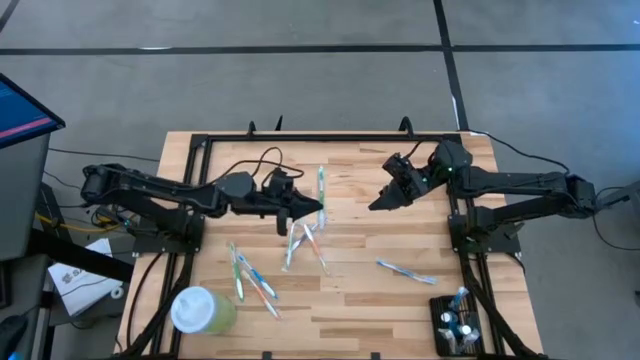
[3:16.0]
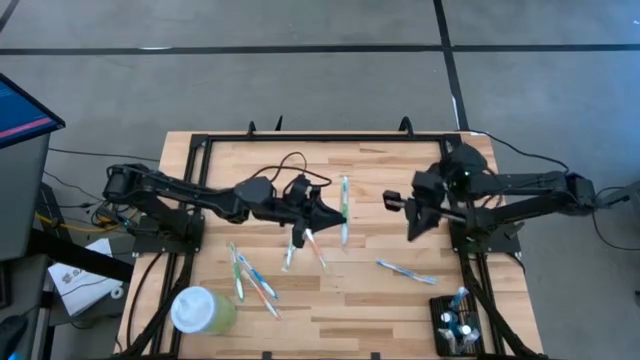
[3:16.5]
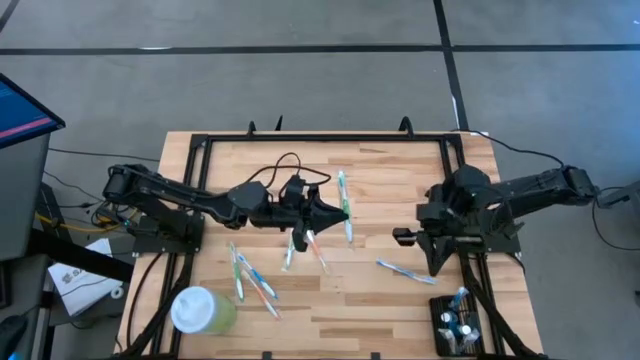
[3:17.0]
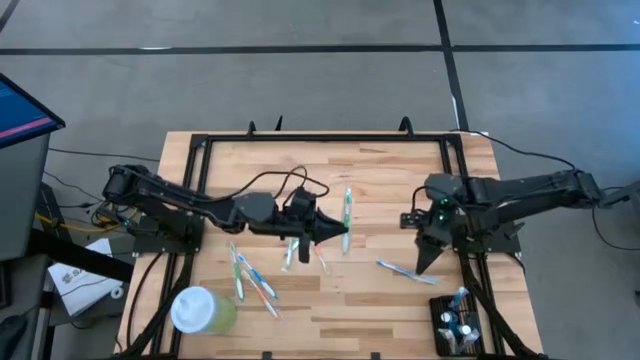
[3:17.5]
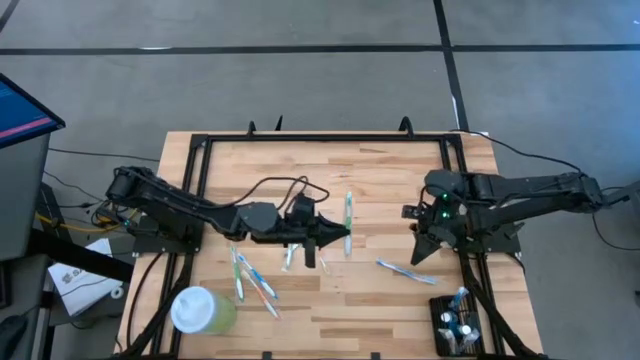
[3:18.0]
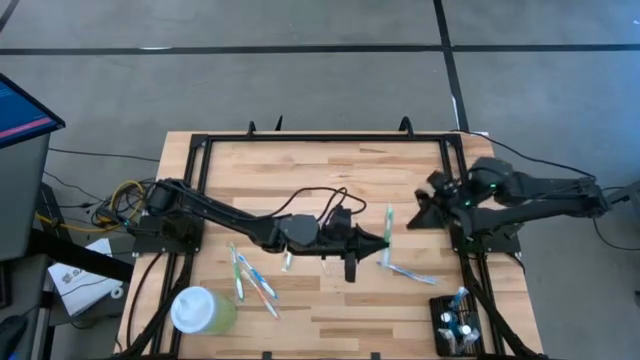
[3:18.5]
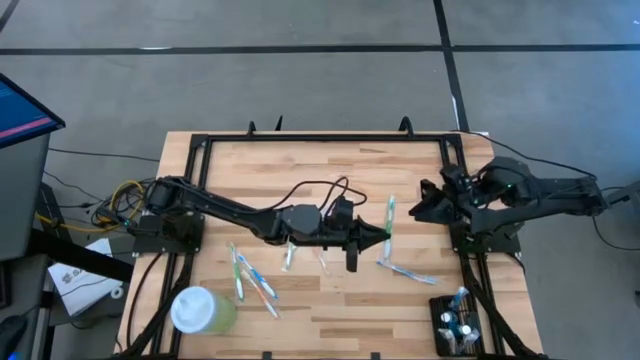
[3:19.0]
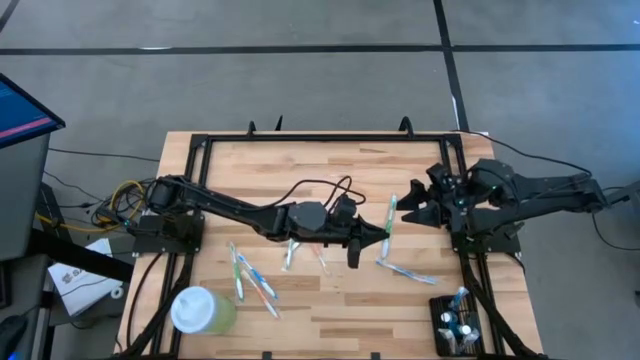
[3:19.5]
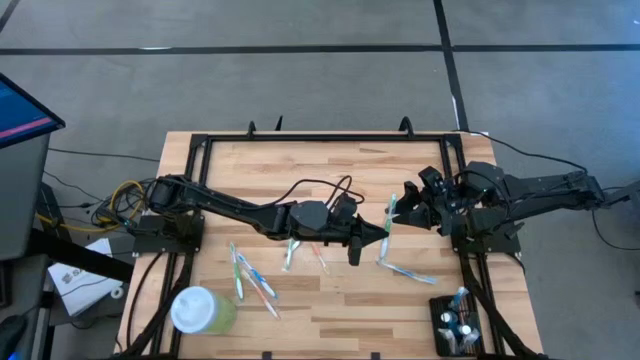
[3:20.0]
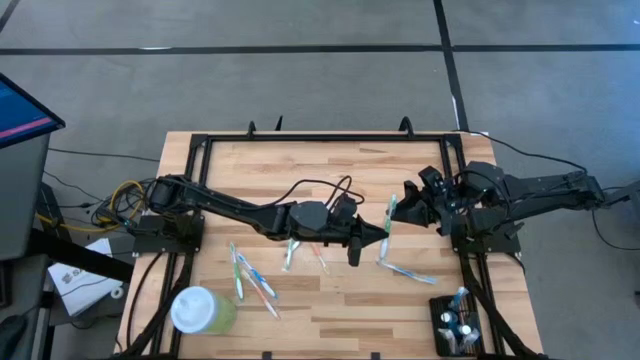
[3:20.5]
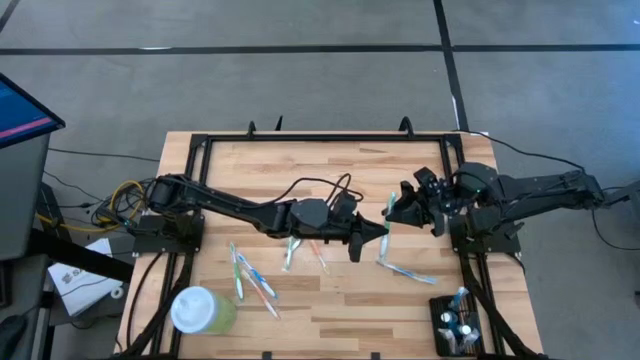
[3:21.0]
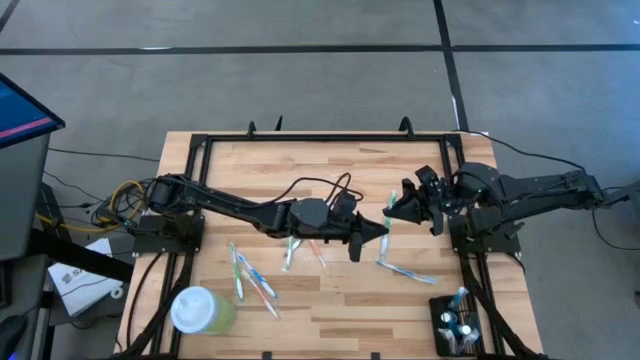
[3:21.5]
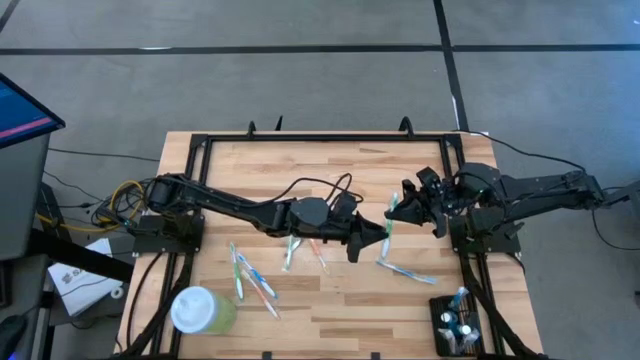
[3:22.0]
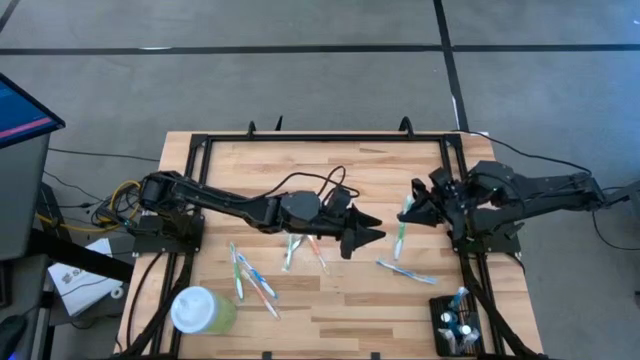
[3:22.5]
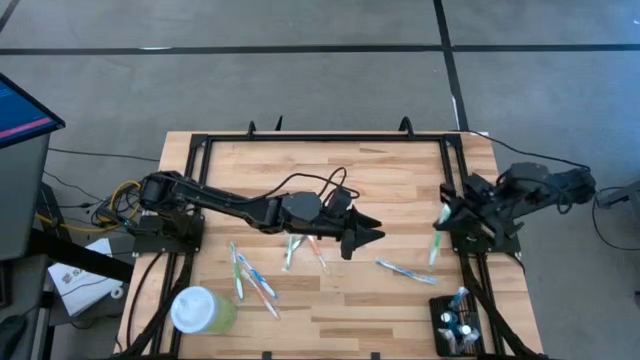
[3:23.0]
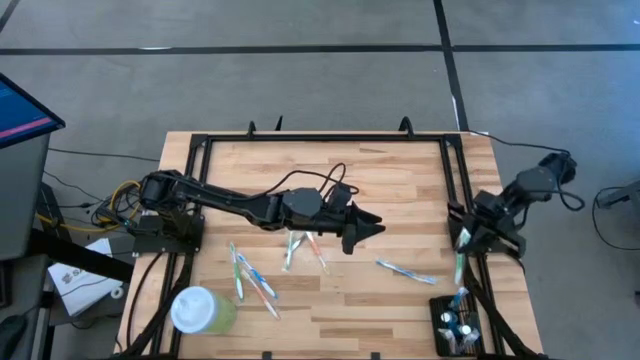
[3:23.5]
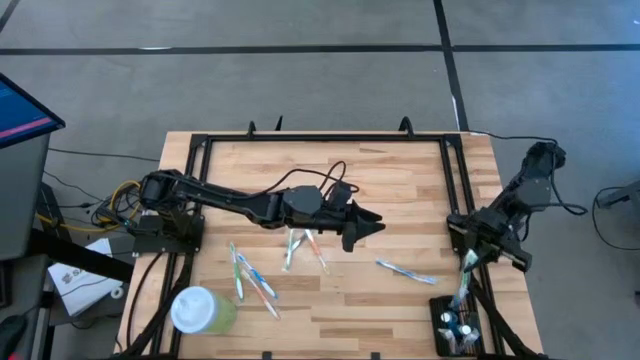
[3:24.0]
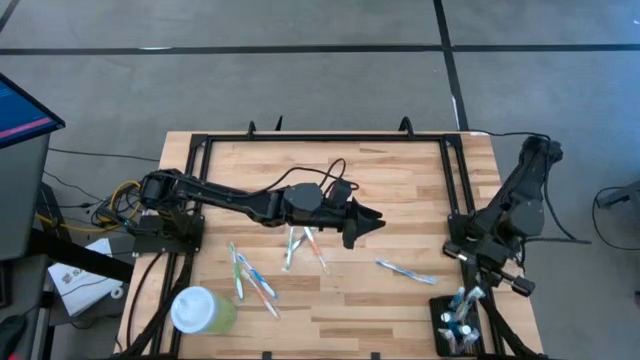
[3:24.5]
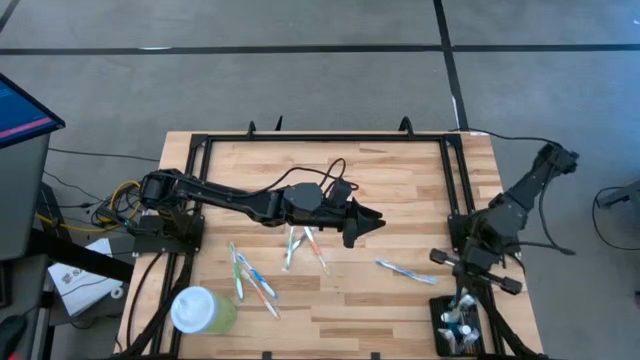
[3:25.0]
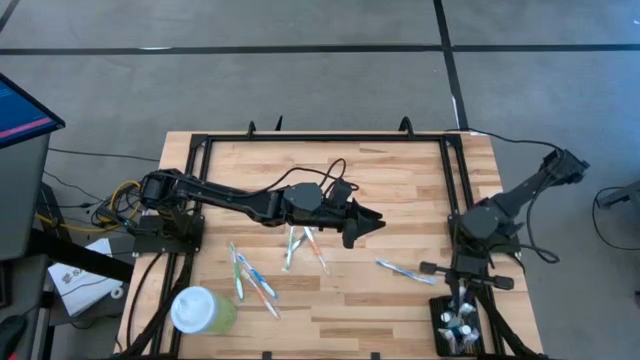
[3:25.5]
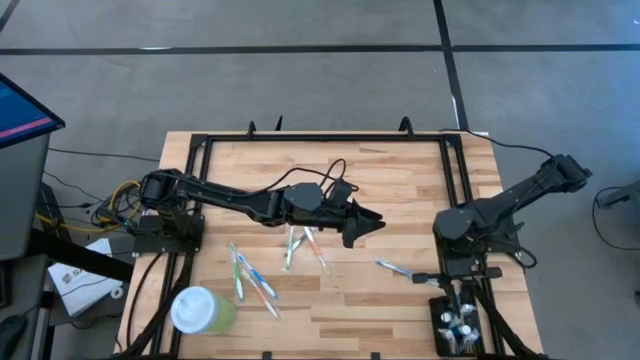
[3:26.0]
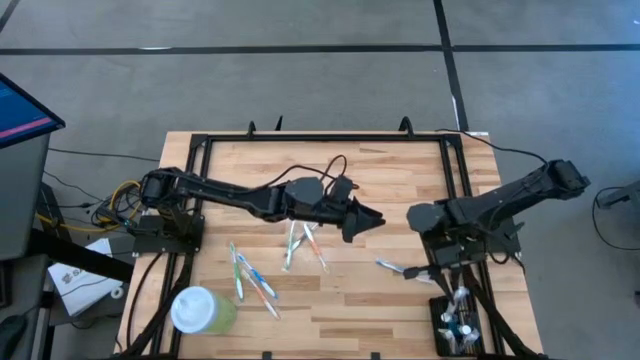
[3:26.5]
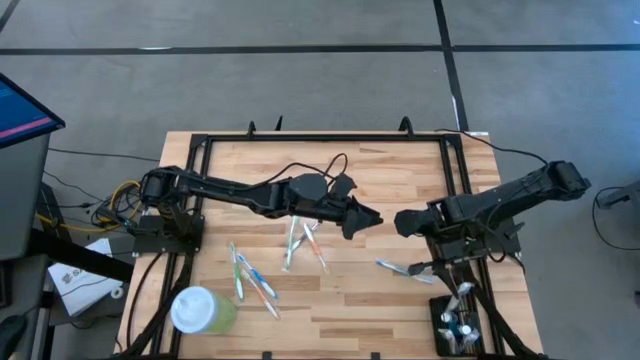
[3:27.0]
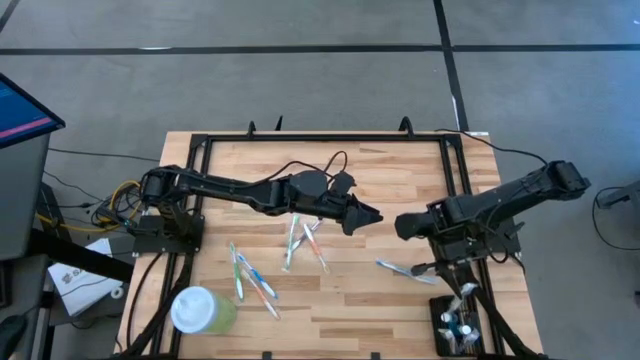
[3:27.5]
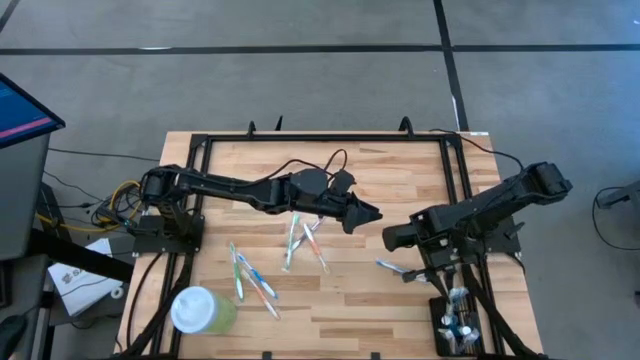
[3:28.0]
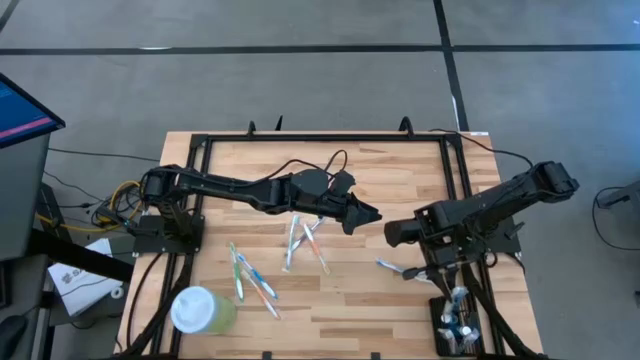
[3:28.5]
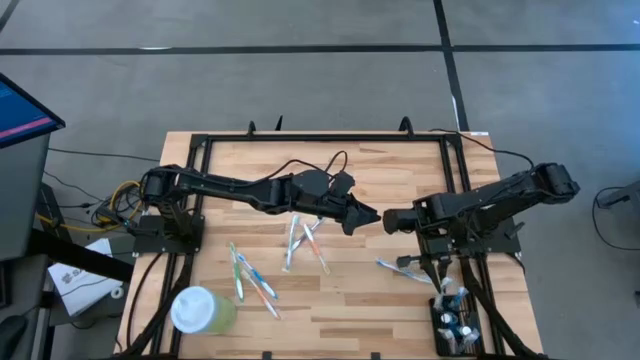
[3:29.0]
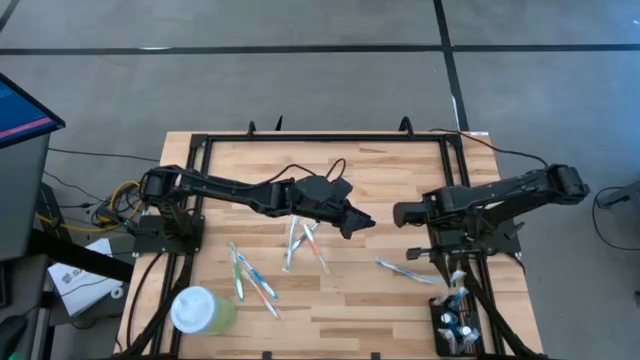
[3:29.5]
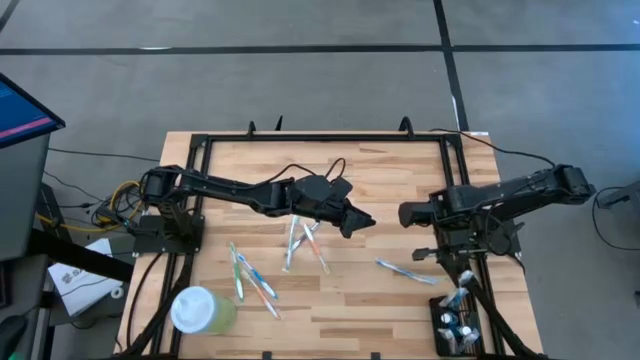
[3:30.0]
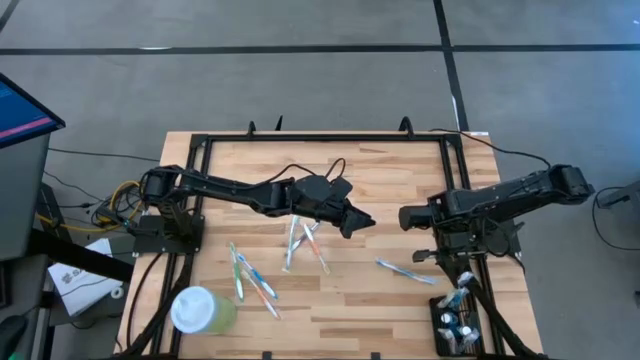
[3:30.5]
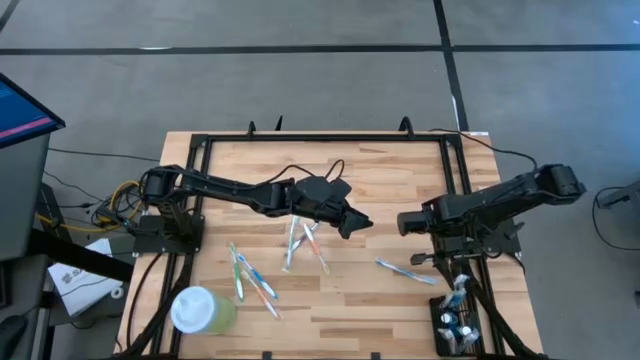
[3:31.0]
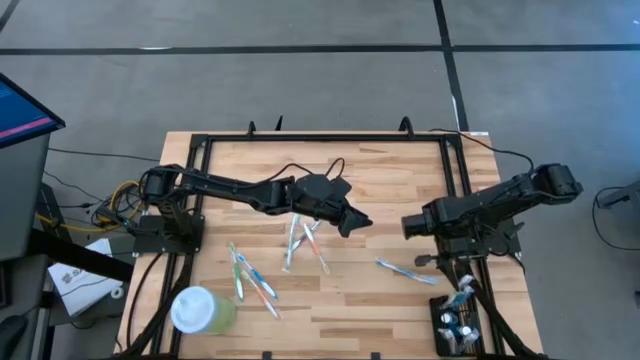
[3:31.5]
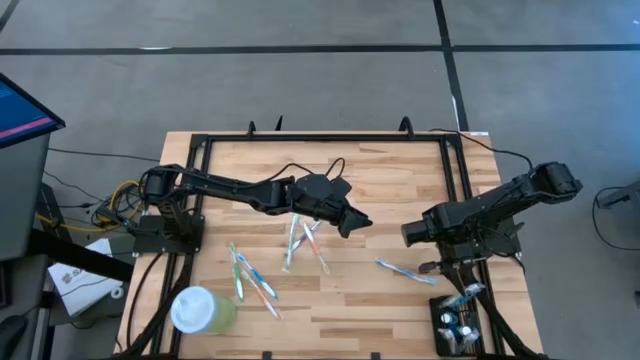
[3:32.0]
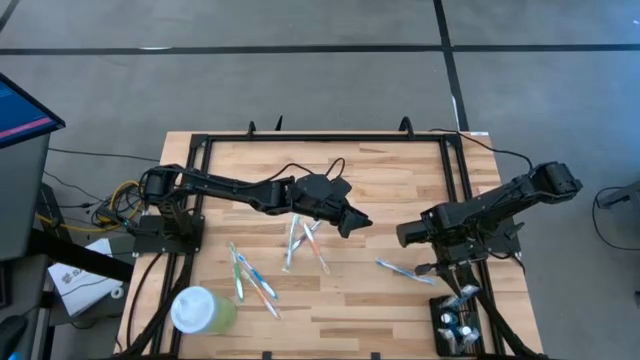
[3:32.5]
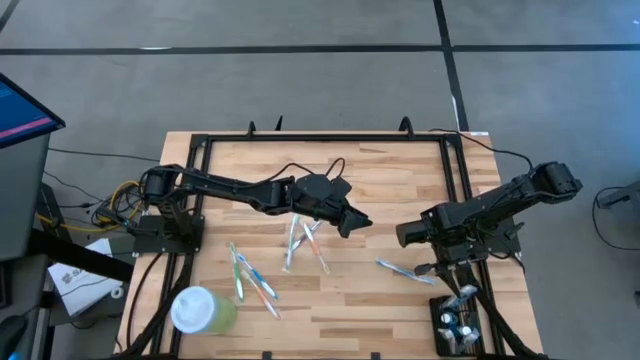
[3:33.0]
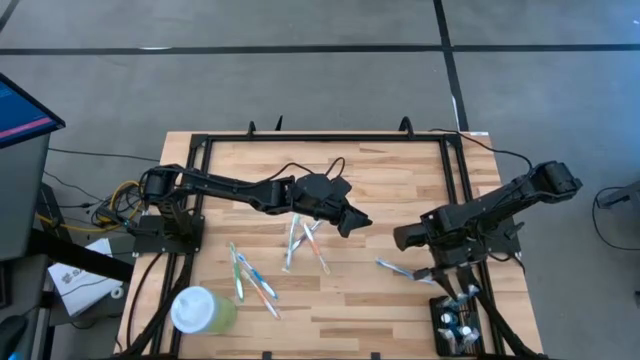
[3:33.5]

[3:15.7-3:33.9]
Task: Pick & Place toothbrushing station
Put the top left green toothbrush into the black organizer

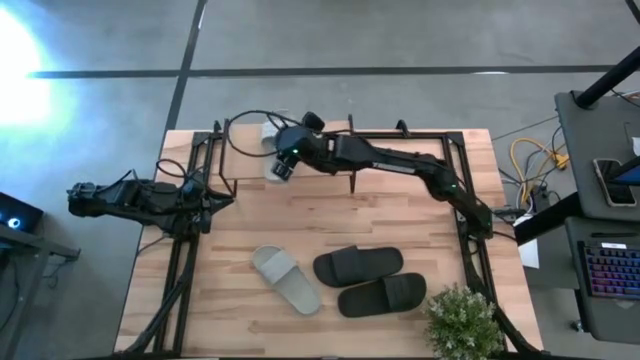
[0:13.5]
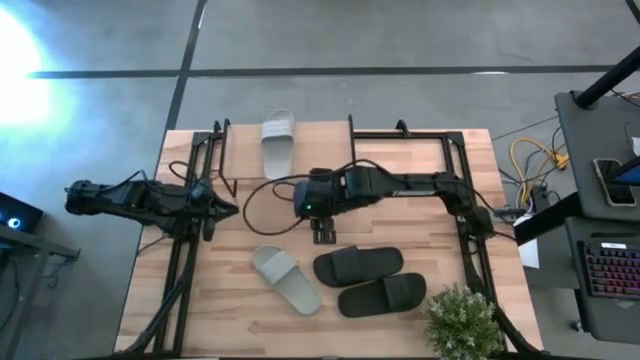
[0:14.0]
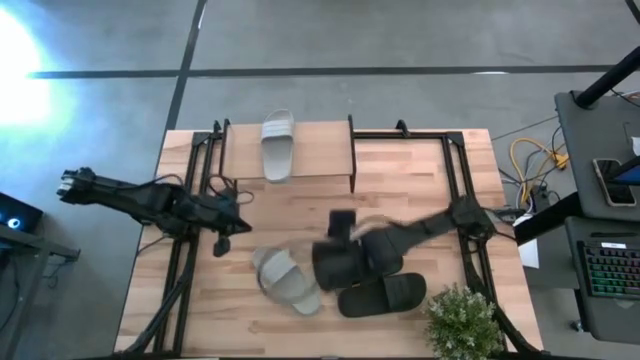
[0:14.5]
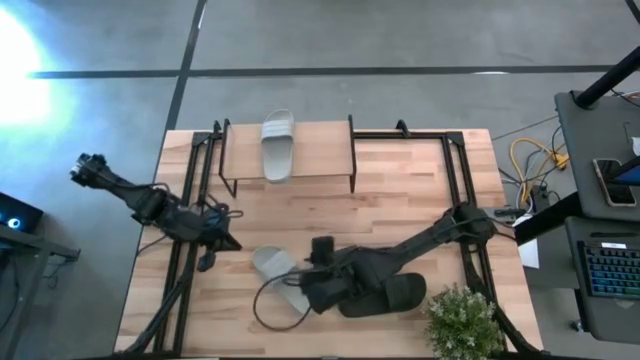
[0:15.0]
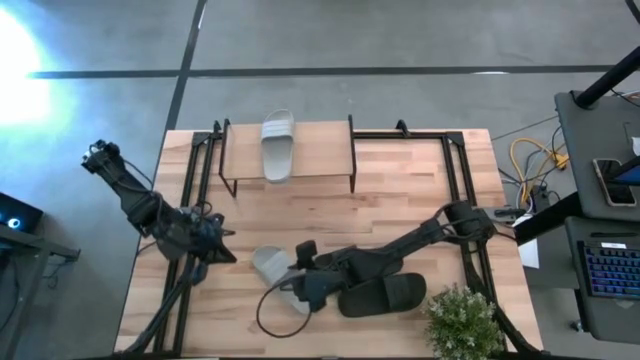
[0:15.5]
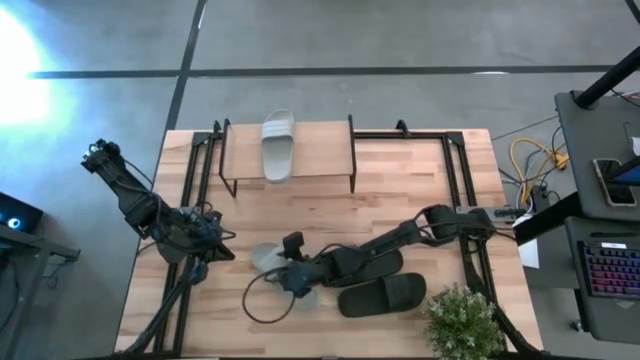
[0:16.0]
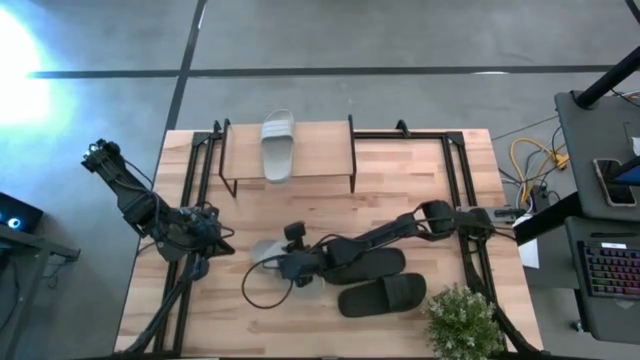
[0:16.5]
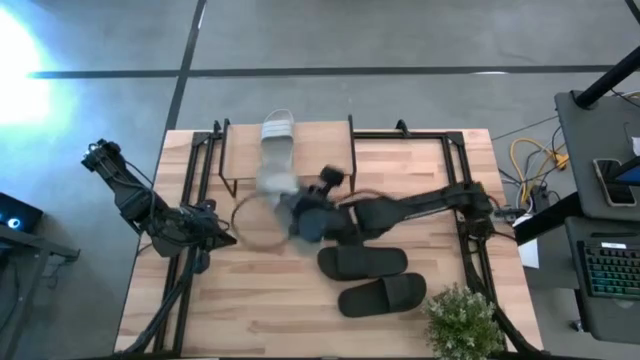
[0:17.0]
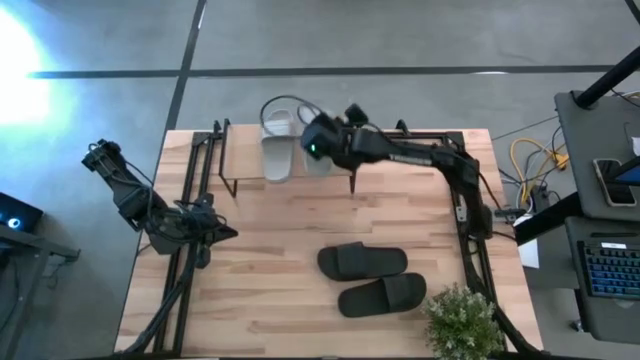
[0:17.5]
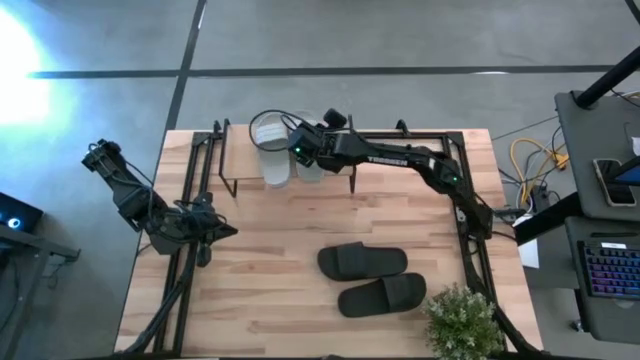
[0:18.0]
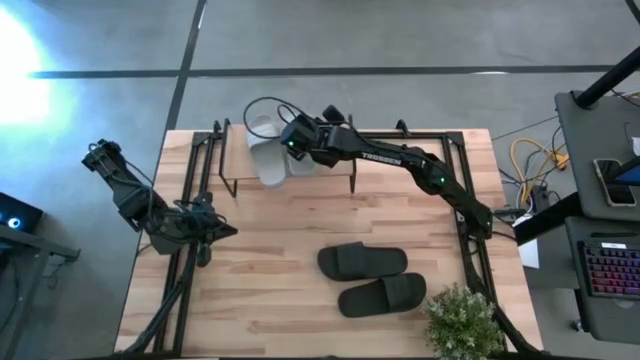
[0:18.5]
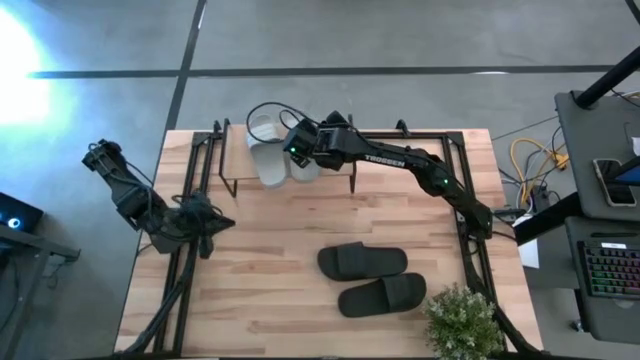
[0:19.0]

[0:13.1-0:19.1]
Task: Pick and place slides into the shelf
Put the gray slides on the shelf
